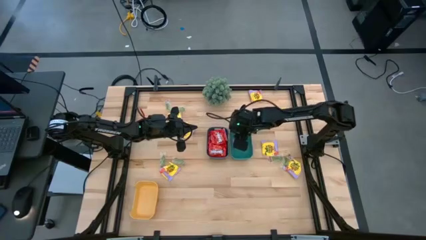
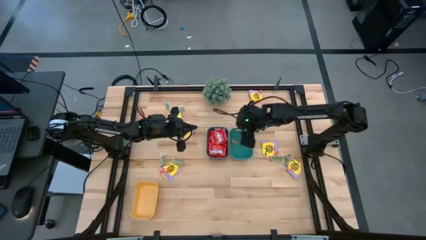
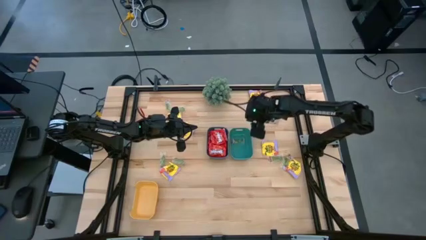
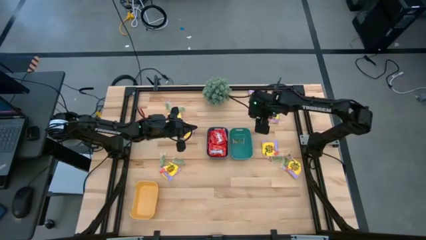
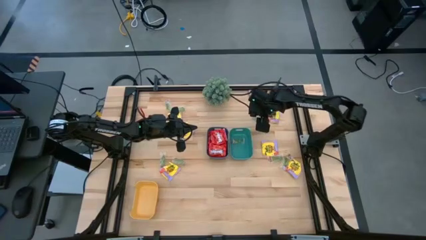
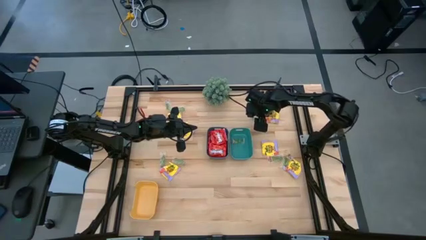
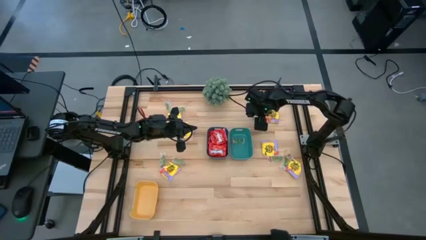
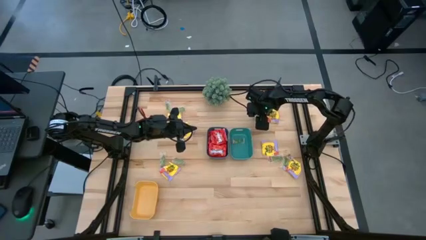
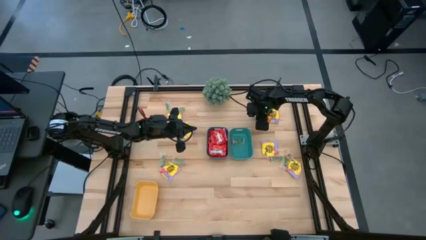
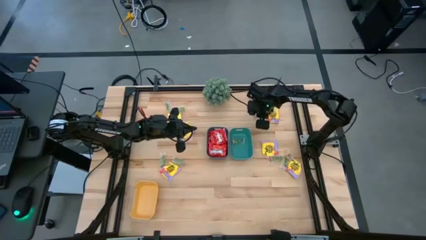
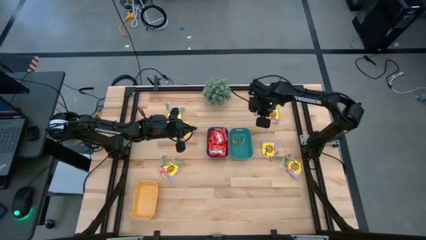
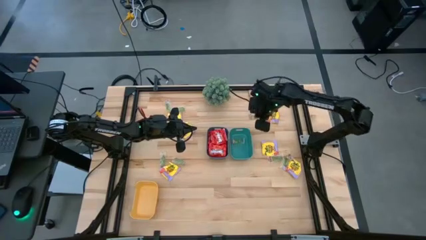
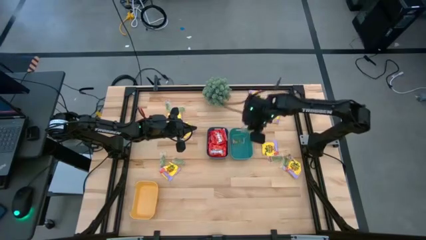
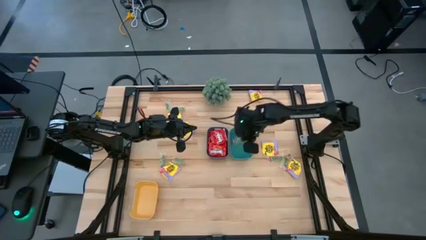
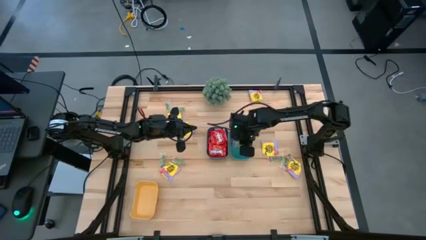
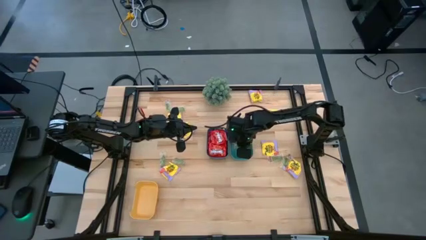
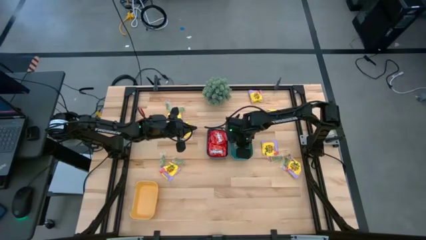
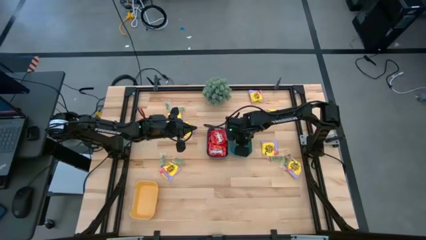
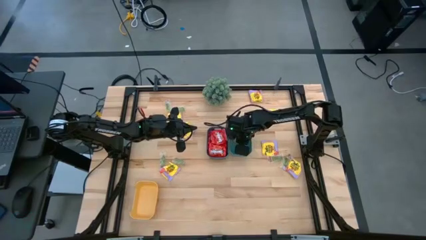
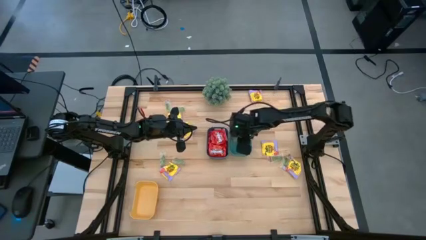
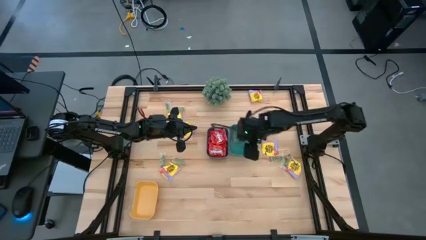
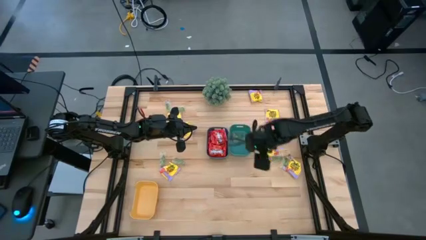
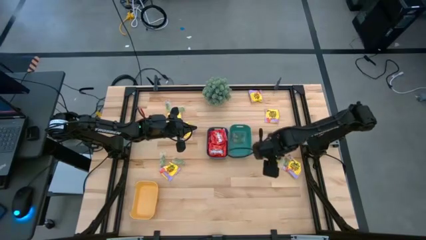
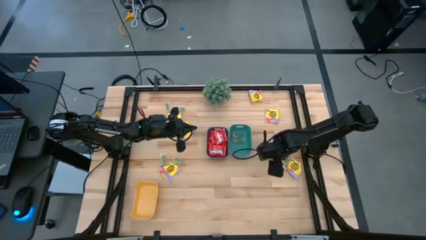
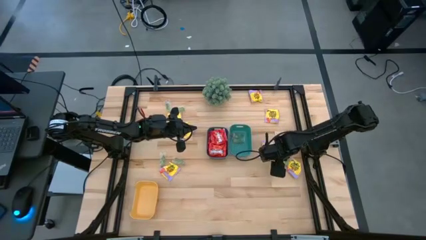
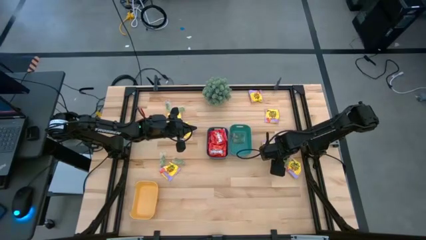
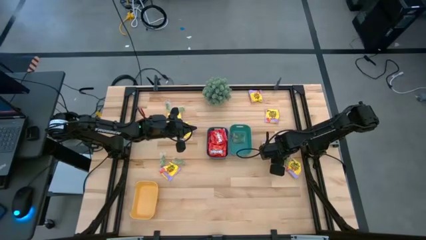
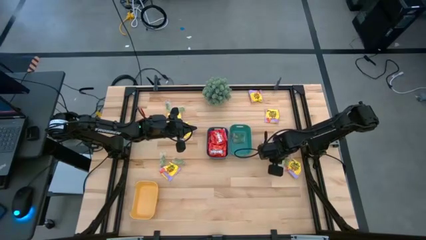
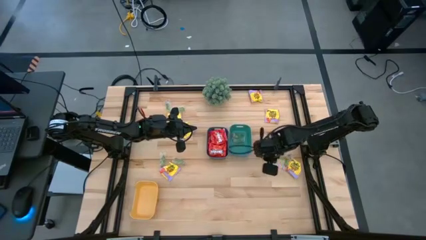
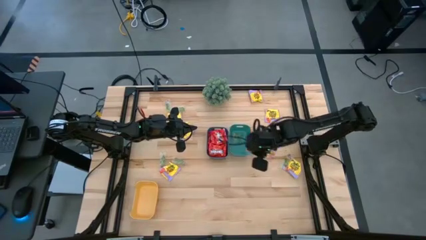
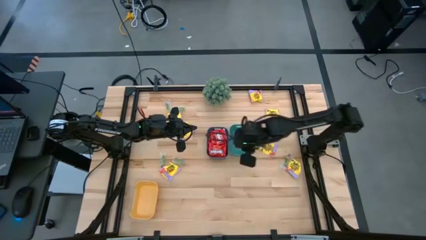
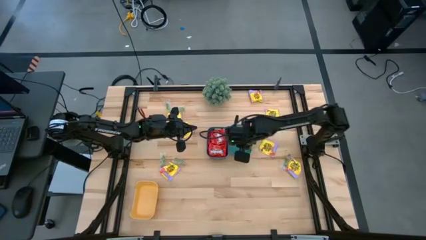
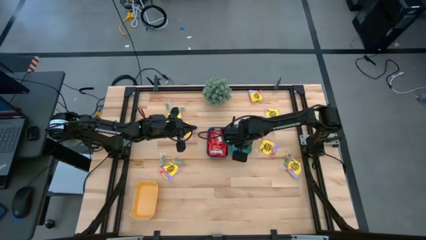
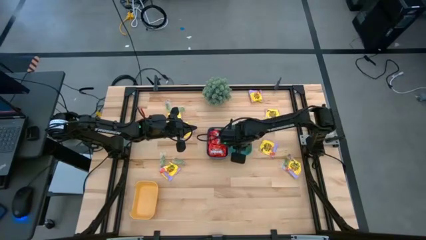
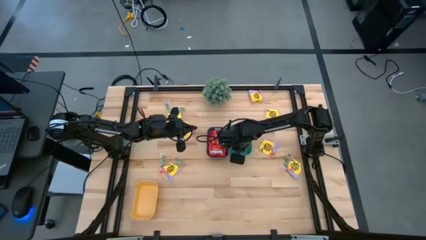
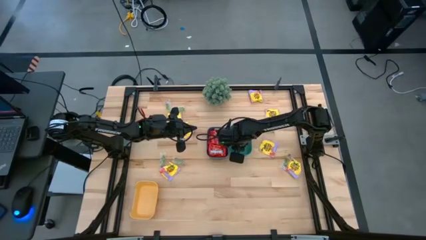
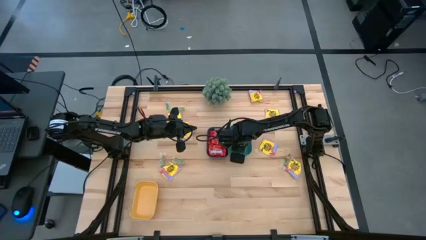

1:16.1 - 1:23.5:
Task: Sort candy
Put the green gummy into the green bin

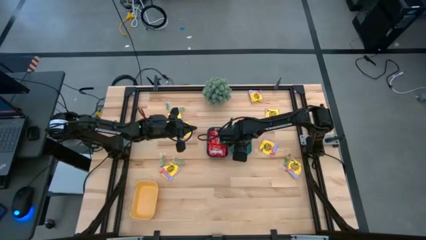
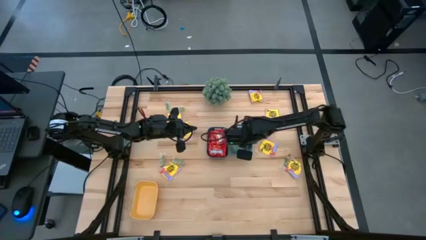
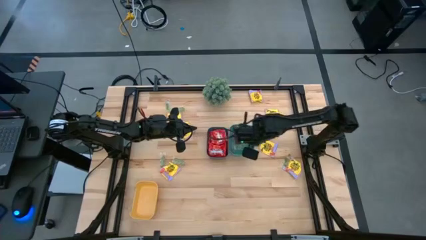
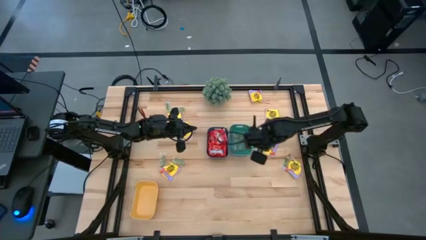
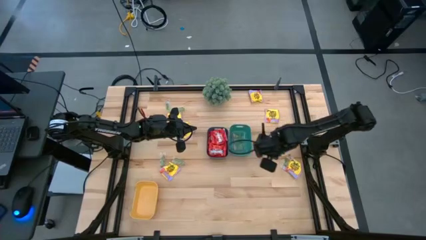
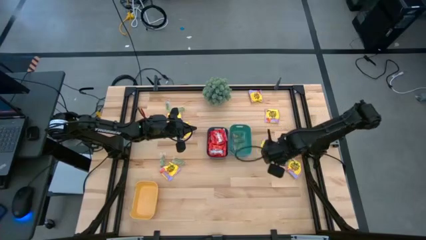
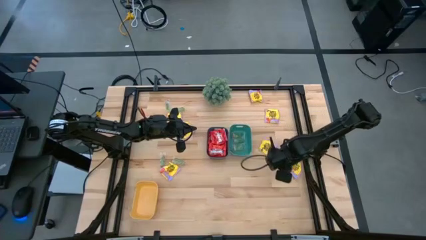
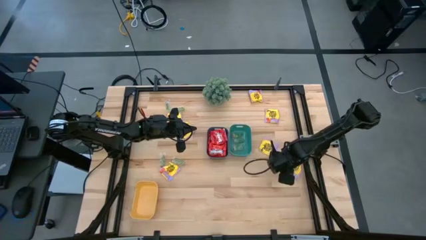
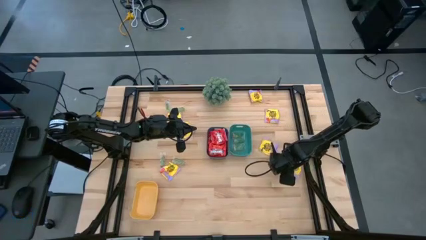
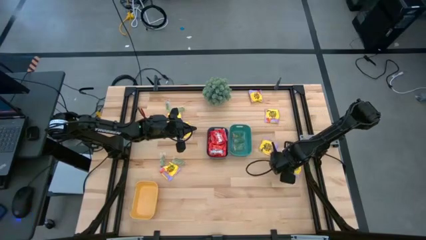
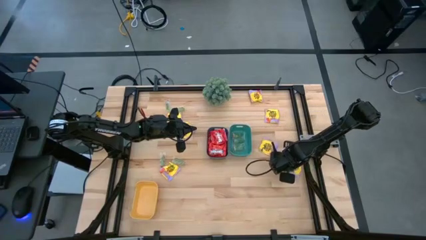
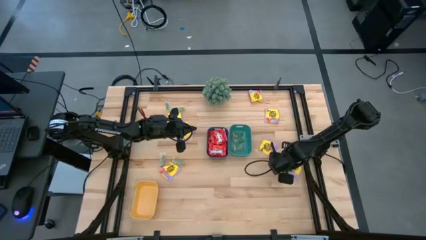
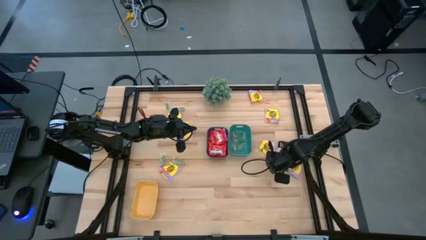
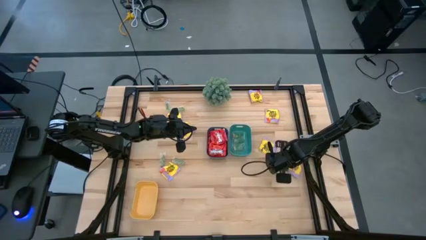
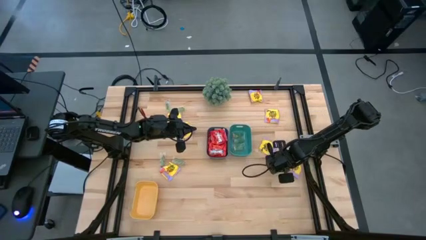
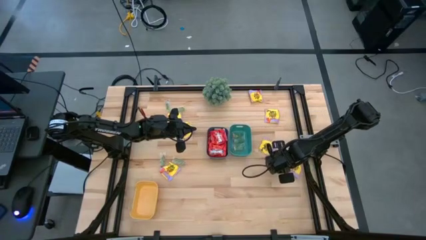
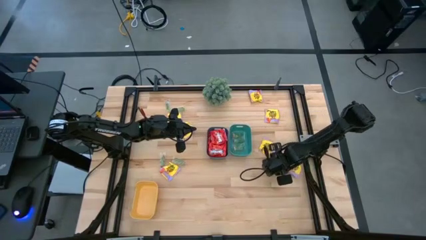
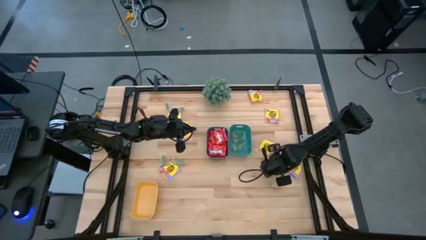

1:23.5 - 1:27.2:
Put the green gummy into the green bin

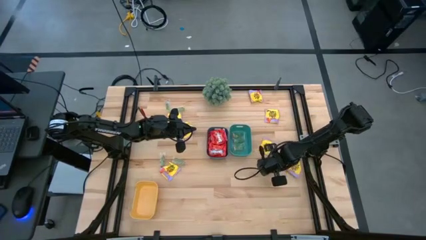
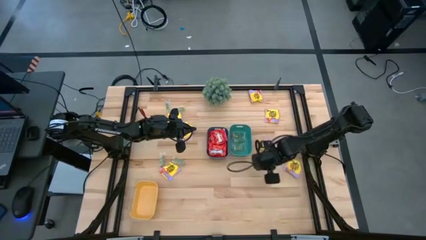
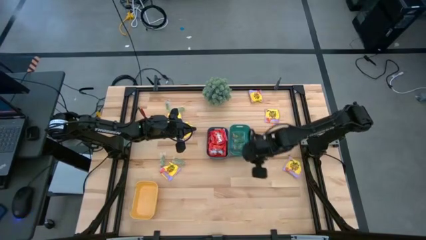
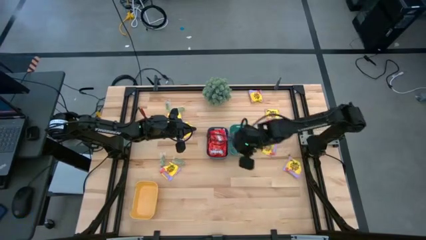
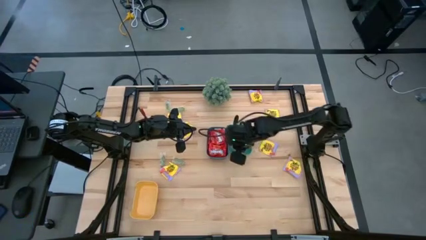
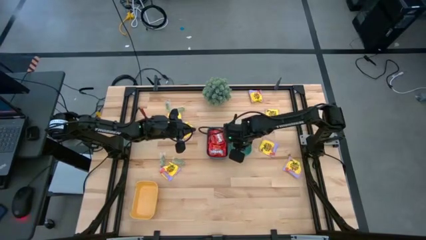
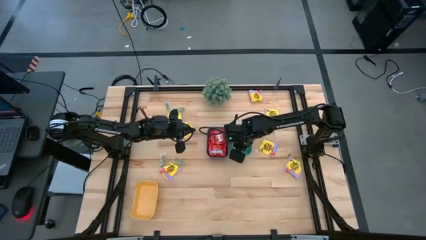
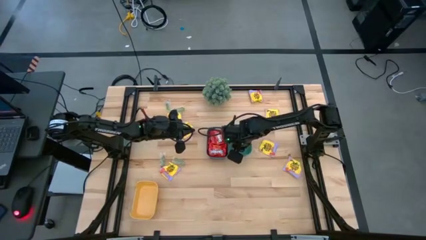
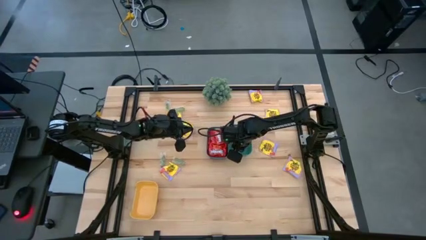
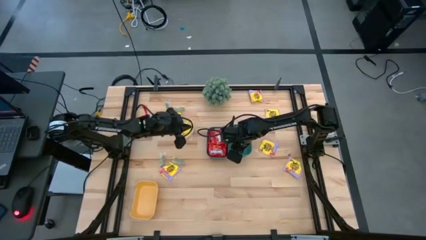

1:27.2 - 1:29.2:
Put the green gummy into the green bin

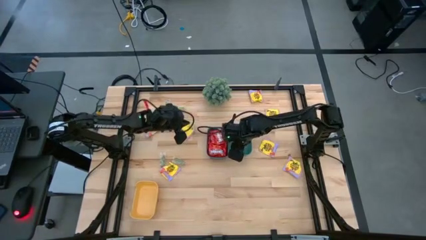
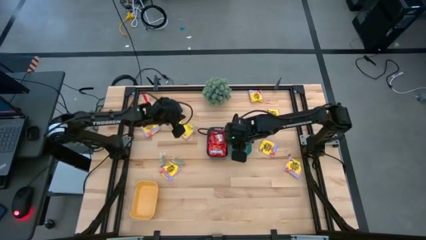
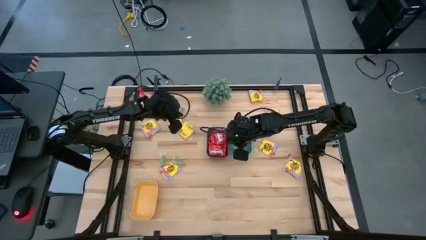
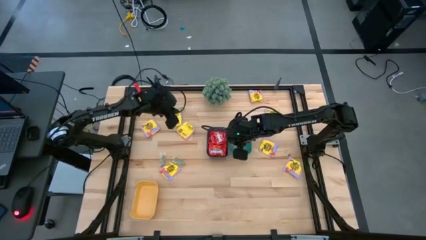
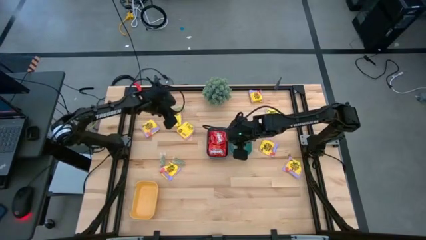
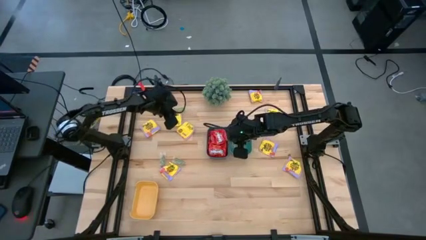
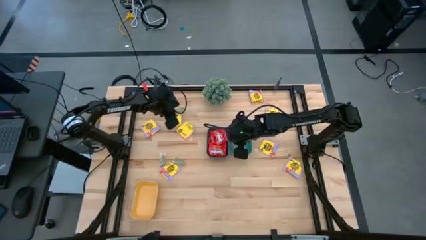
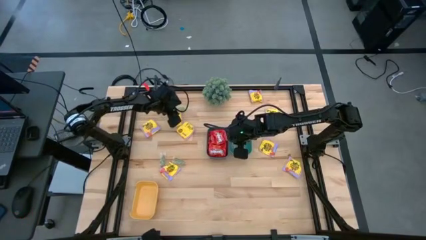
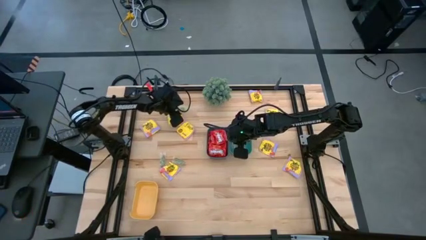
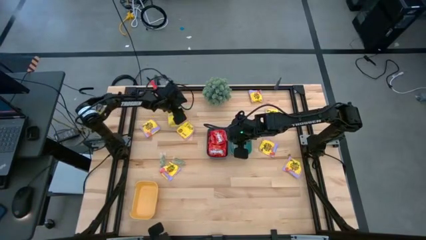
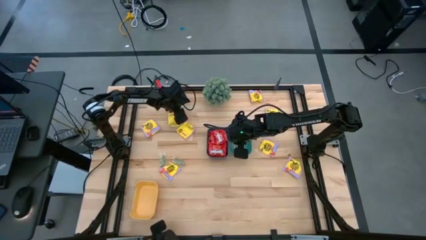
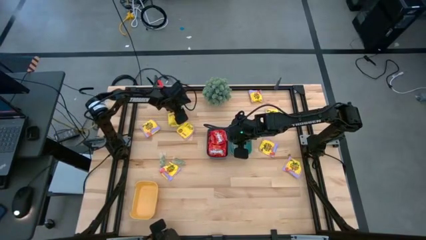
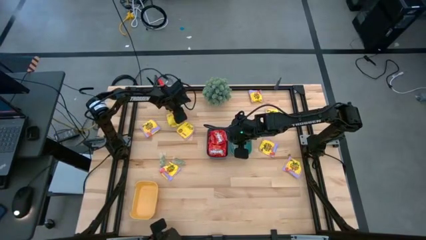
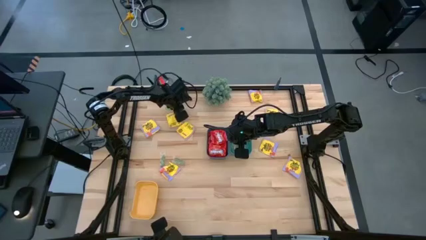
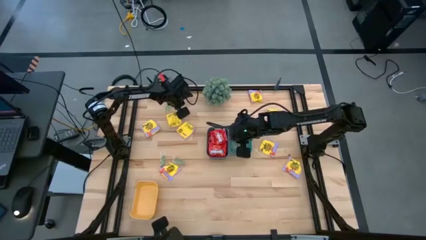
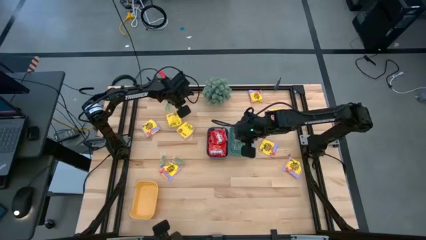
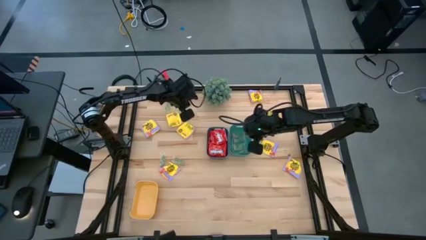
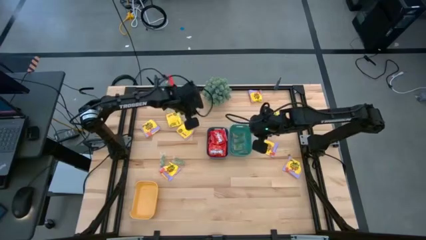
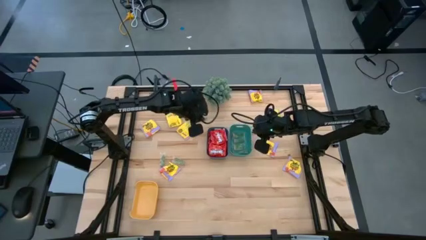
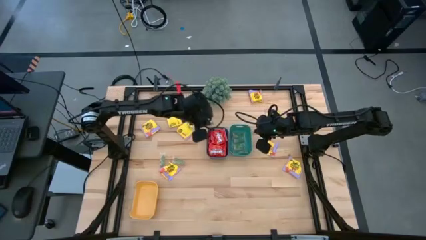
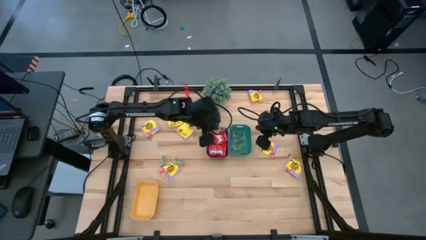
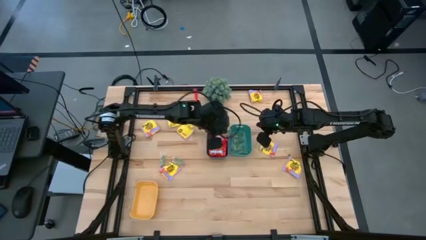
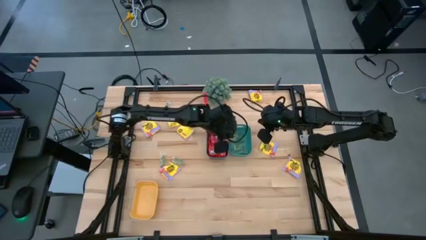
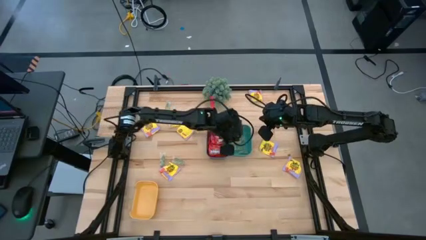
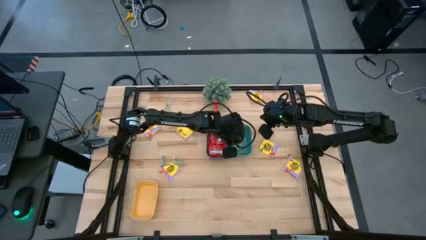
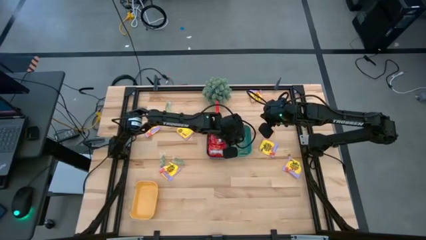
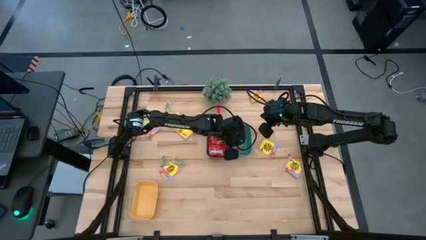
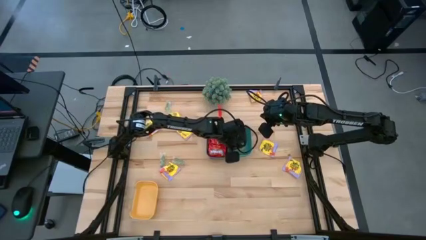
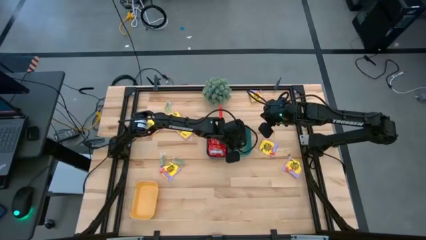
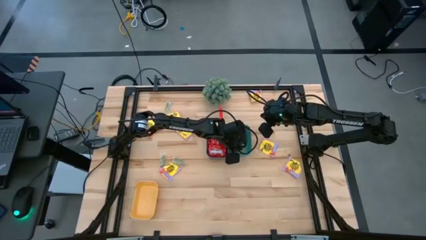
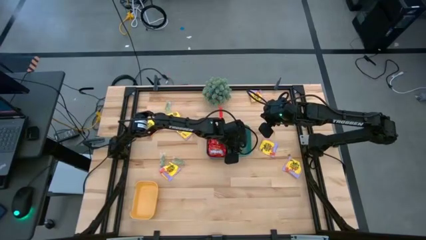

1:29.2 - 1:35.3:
Put the green gummy into the green bin
